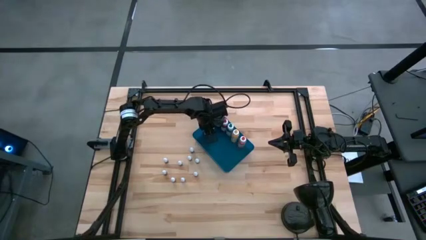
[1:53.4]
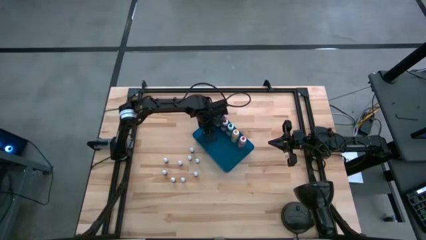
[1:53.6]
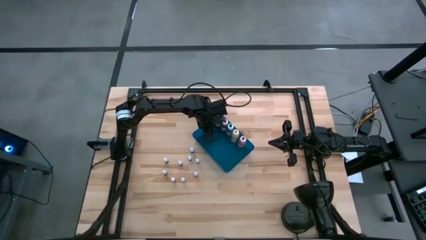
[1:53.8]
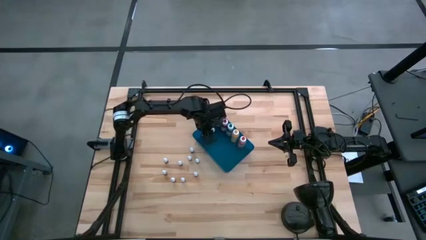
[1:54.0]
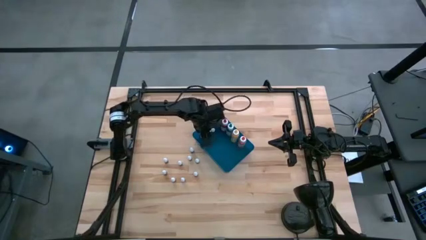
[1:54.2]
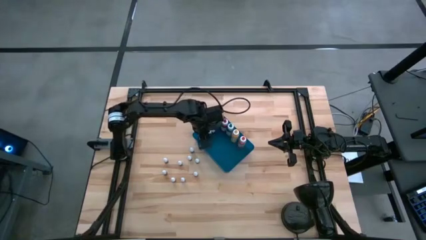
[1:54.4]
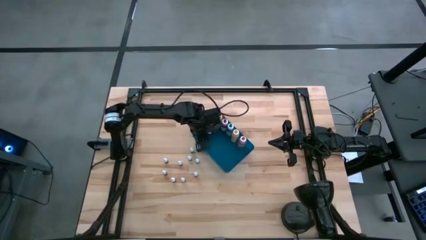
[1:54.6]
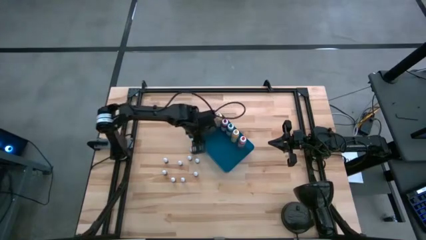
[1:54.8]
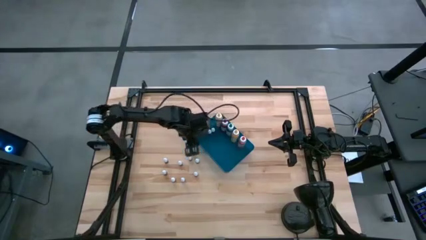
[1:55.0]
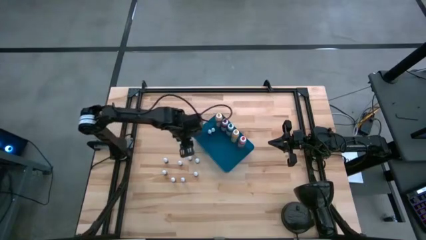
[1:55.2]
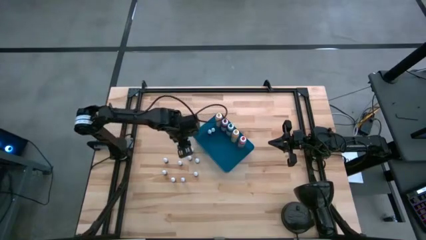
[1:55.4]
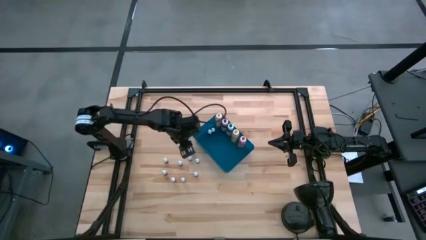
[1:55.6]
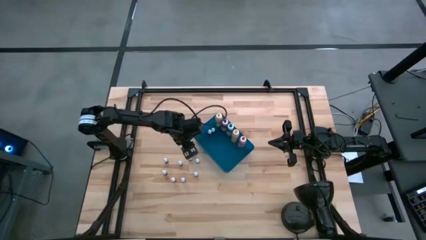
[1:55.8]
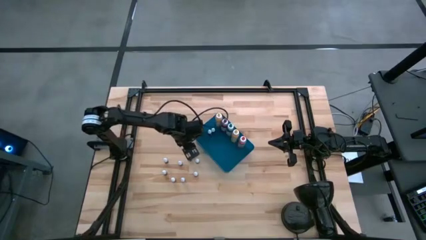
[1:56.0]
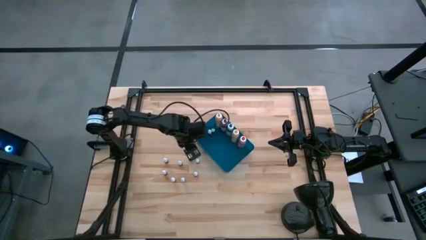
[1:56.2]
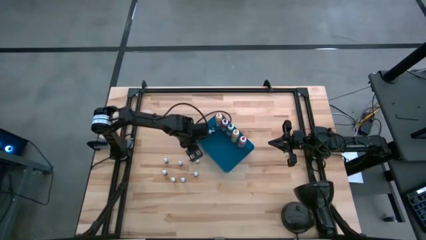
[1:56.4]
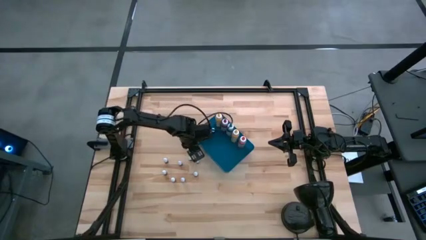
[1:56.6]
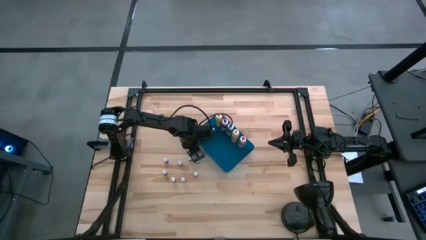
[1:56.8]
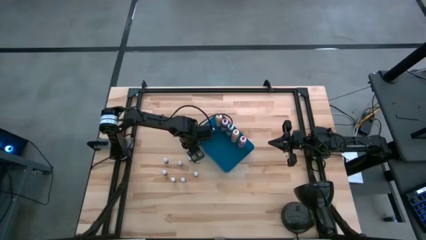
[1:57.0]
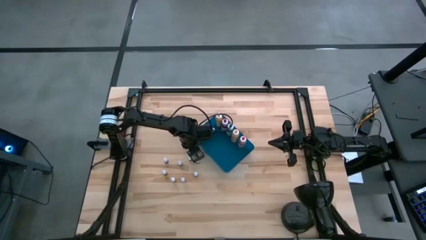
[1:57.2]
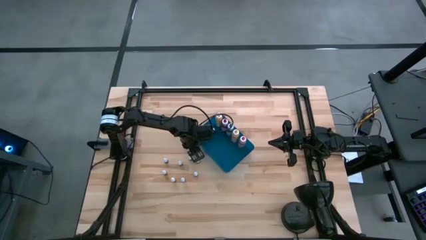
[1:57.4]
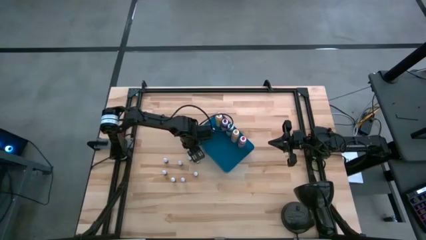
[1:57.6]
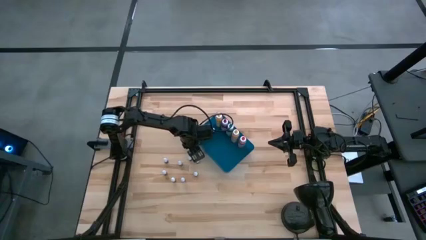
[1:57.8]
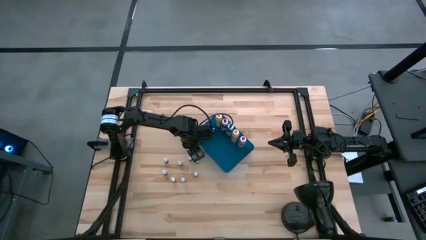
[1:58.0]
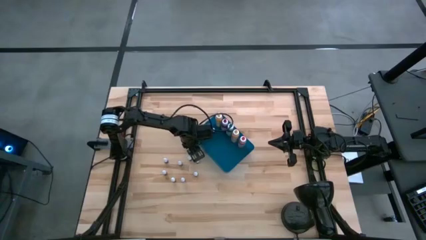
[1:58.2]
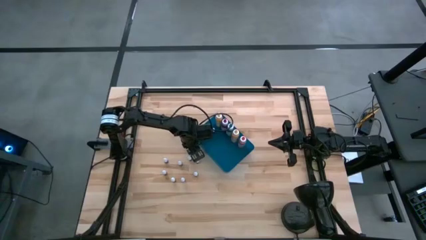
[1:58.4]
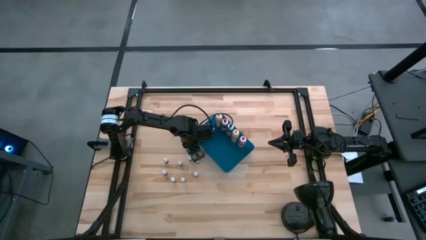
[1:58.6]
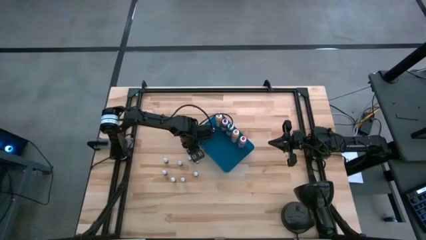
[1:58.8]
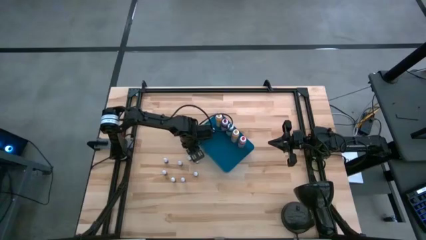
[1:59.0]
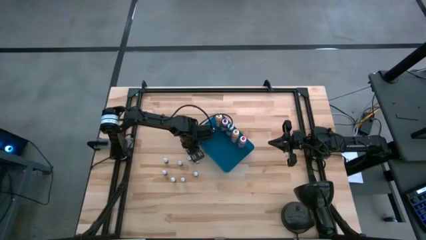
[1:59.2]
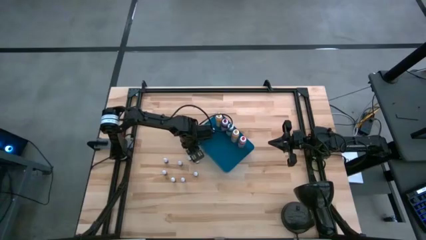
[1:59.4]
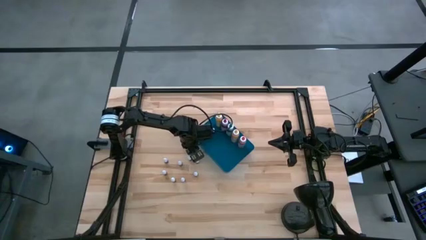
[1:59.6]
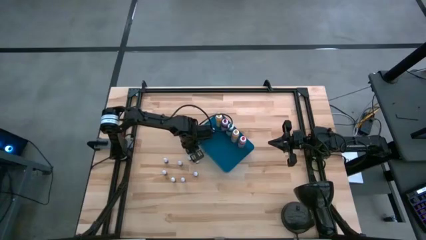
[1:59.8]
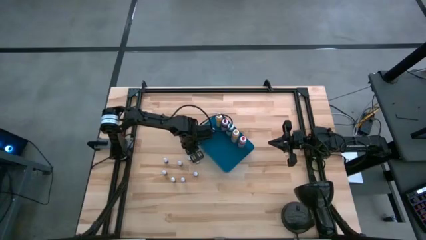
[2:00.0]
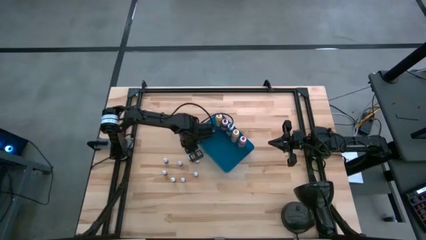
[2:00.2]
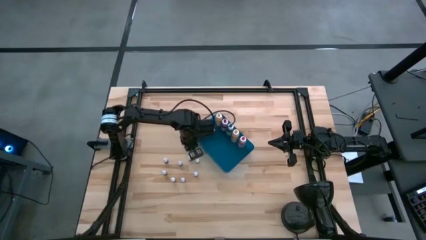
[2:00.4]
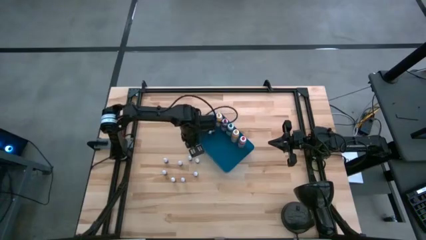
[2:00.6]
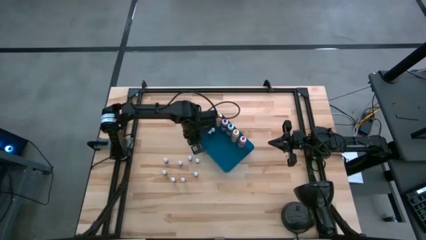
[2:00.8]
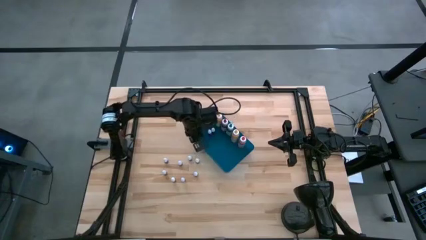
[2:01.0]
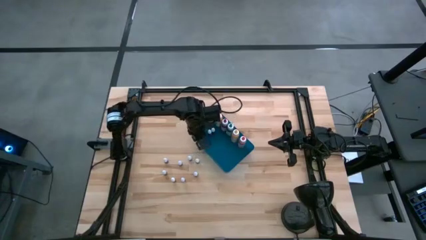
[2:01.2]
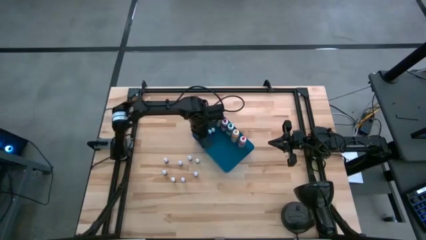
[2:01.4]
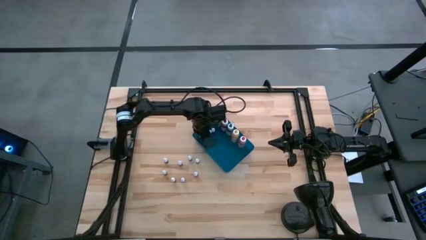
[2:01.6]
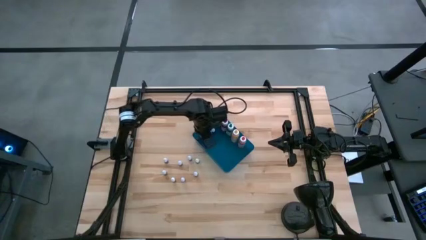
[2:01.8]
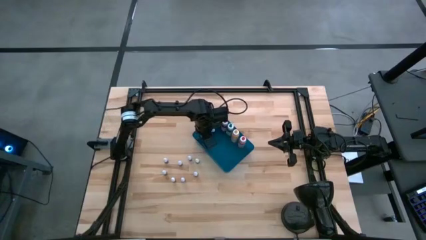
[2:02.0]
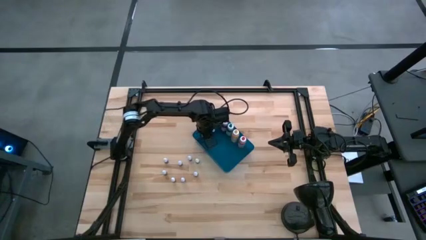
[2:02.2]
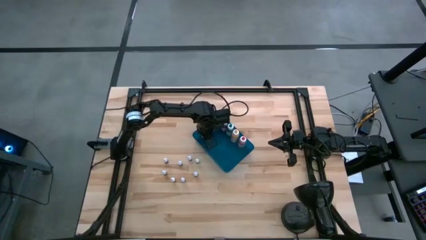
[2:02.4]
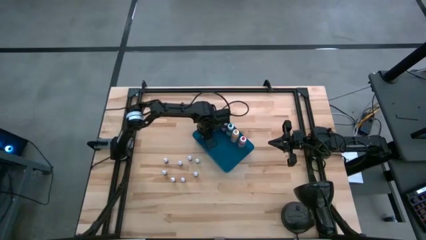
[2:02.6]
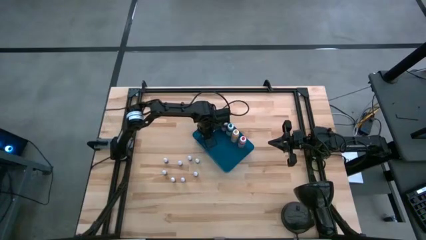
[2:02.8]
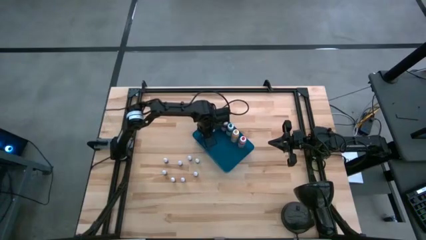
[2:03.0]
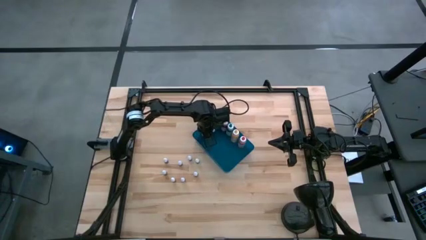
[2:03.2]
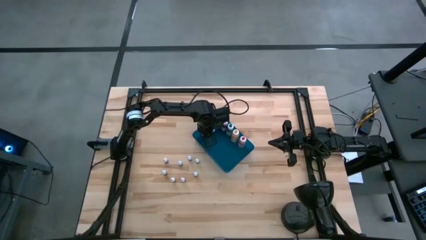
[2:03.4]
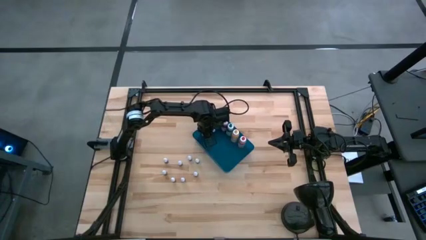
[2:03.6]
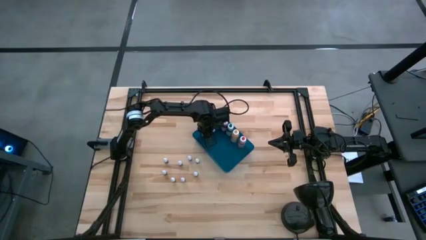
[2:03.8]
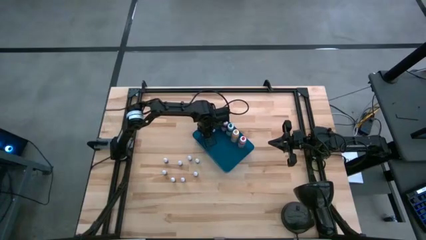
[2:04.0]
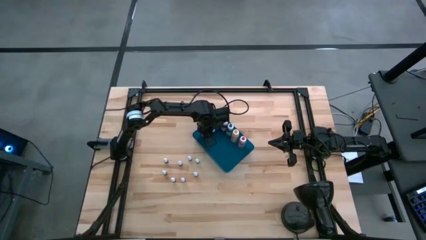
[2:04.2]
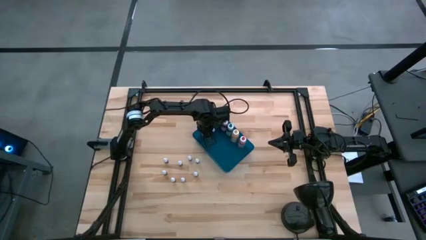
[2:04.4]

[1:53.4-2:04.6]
Task: Pick & Place food coloring
Put the green food coloring bottle into the blue bin

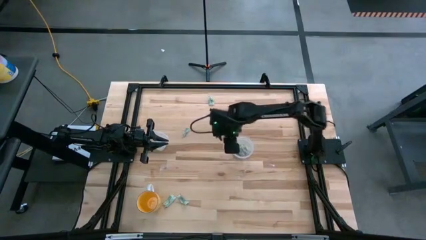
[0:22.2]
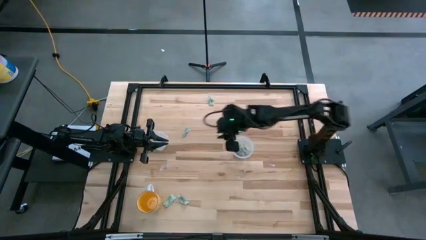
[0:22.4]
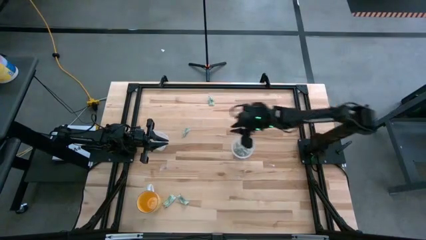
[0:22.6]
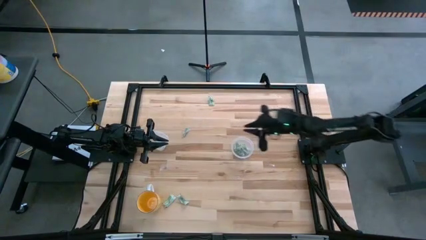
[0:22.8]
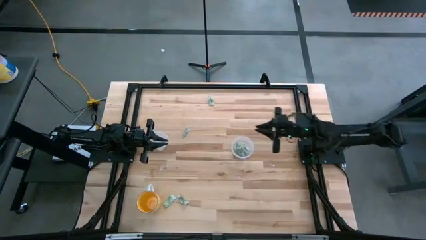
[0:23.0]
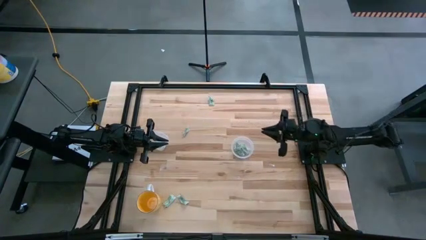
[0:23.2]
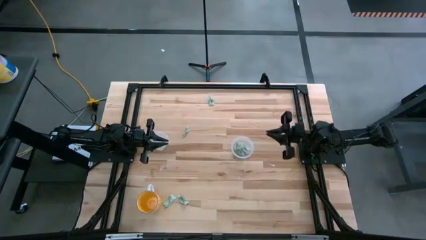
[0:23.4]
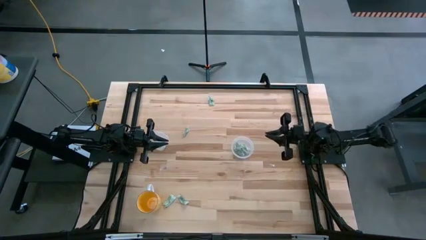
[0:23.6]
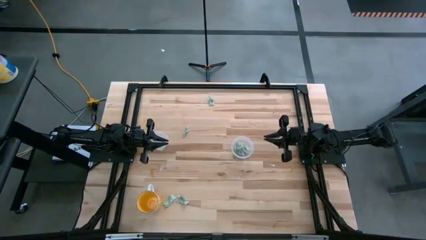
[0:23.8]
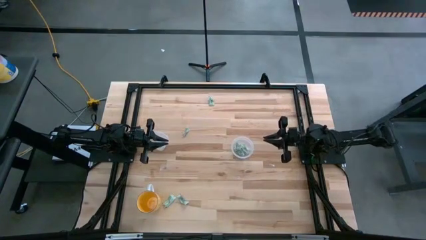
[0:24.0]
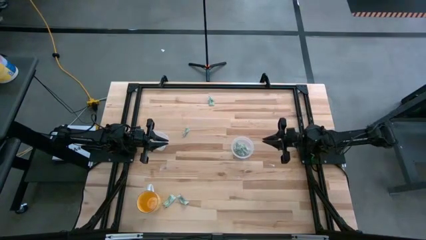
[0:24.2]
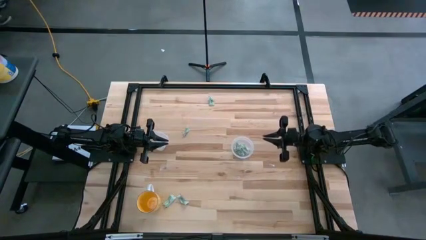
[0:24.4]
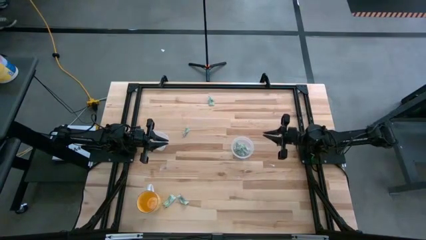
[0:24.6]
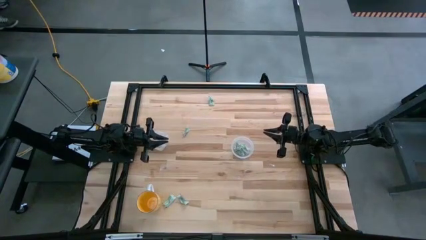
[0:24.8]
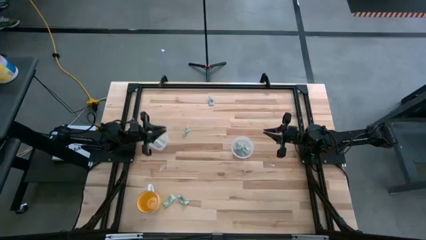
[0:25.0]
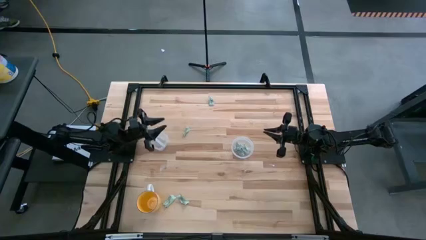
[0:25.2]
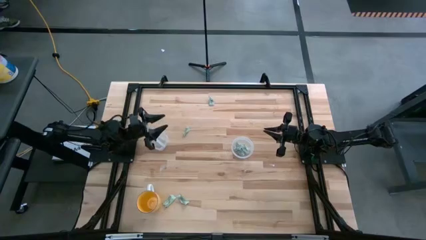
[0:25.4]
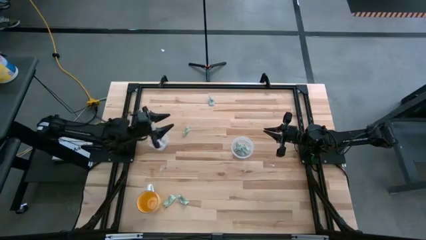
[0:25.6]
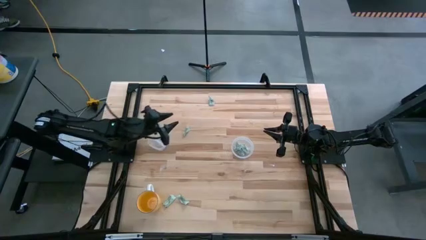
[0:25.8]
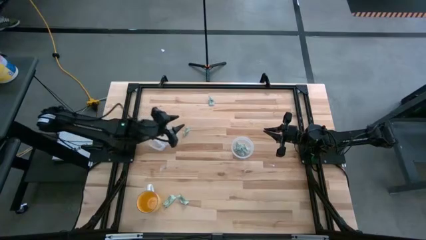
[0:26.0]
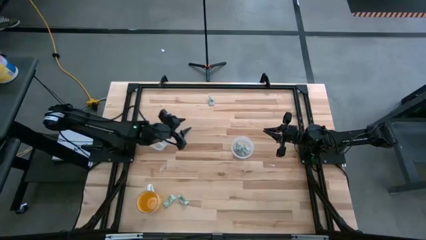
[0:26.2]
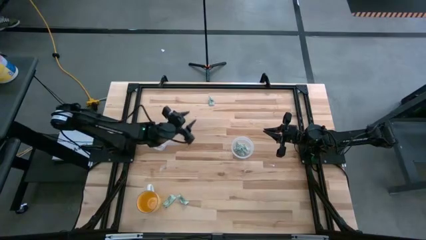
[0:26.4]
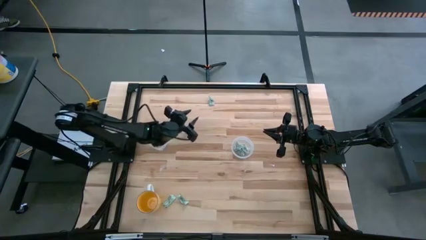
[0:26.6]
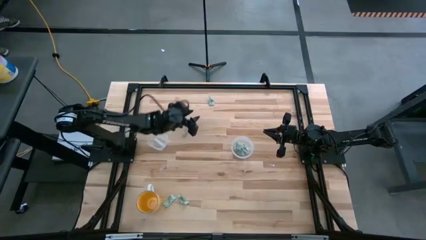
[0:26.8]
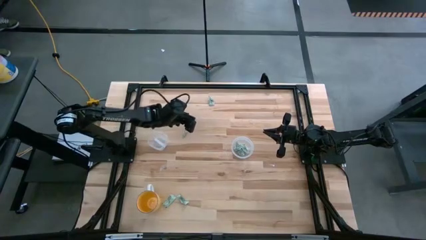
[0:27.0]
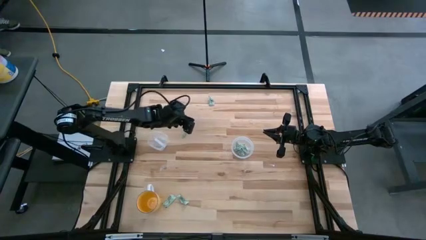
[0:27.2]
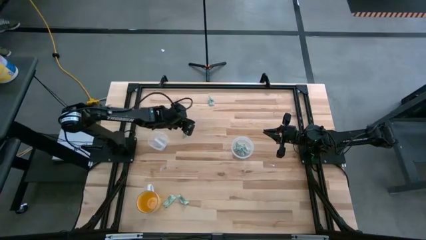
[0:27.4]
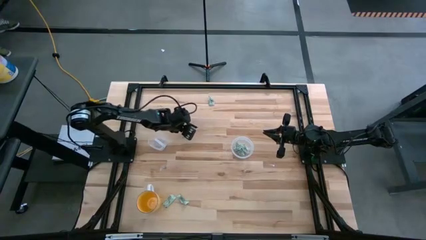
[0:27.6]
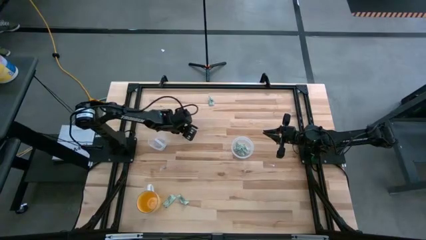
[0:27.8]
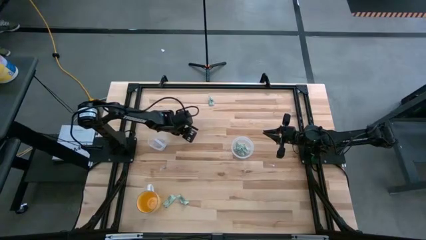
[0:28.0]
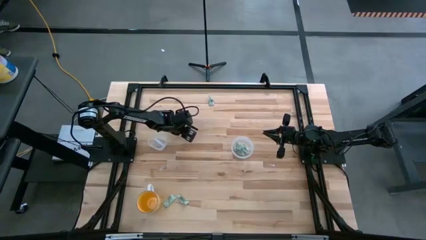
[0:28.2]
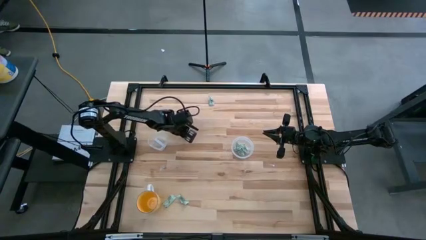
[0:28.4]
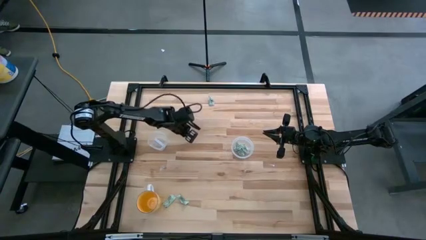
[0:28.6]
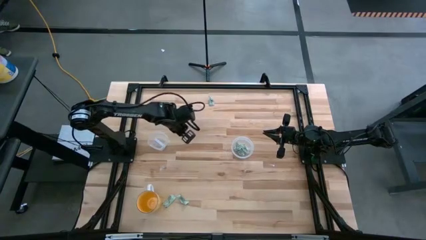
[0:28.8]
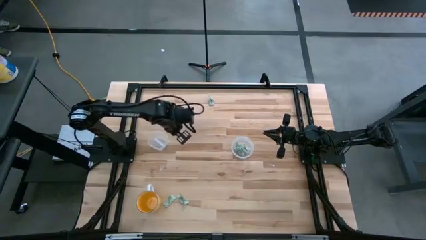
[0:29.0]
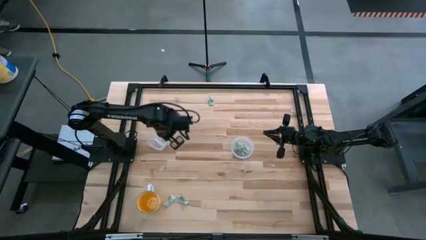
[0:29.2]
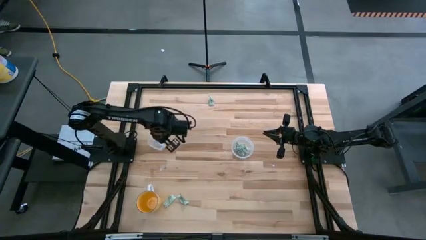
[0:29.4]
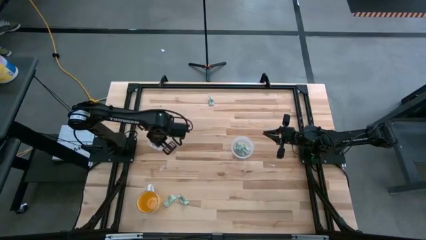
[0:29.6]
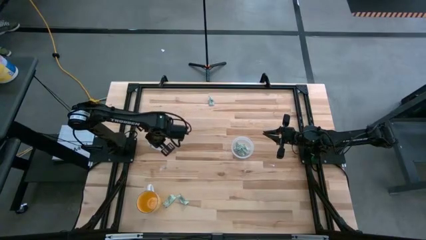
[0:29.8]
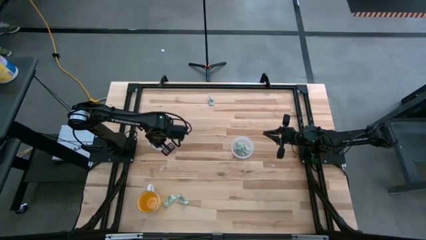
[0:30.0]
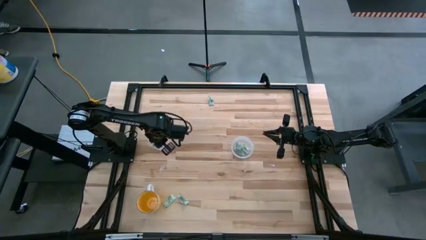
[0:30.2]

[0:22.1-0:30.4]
Task: Pick and place items into bin
Put the stevia pack into the right transparent bin
